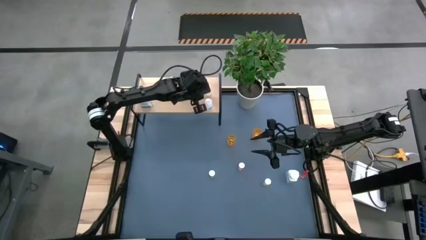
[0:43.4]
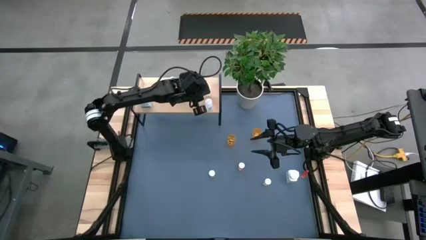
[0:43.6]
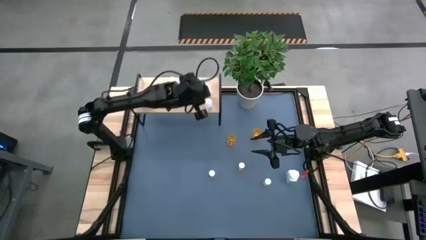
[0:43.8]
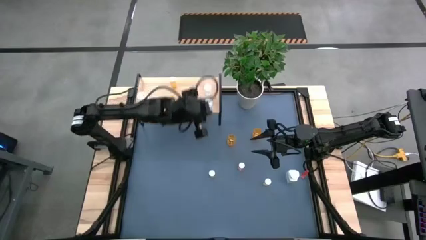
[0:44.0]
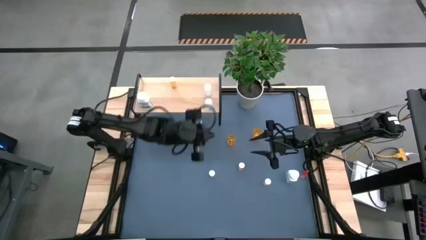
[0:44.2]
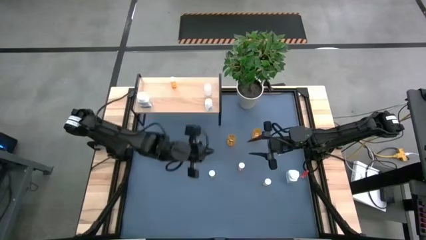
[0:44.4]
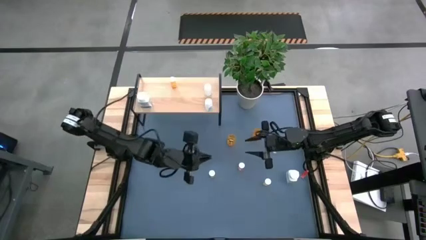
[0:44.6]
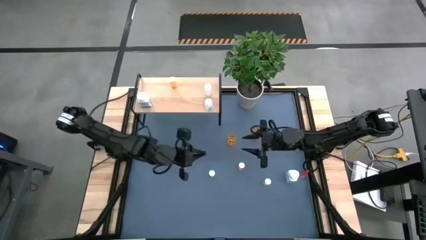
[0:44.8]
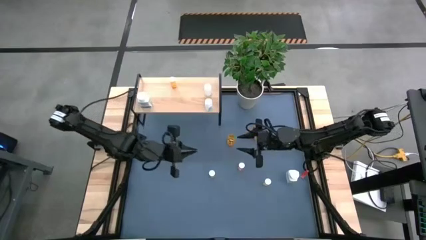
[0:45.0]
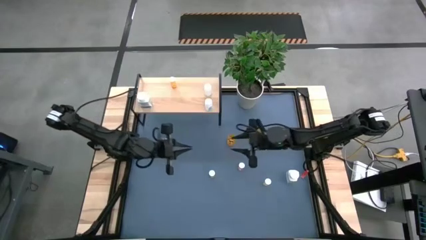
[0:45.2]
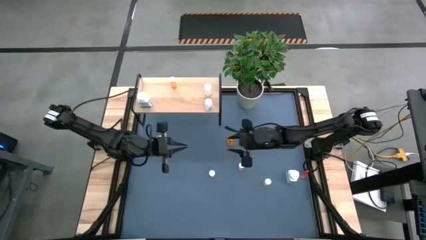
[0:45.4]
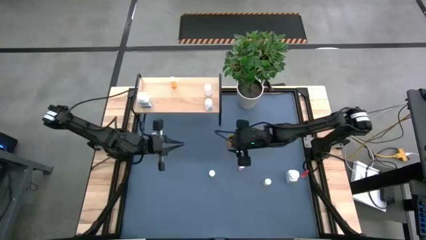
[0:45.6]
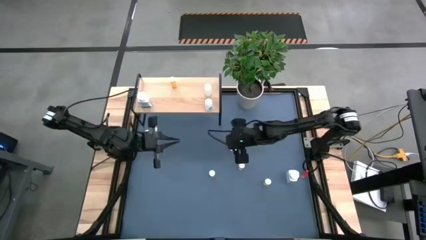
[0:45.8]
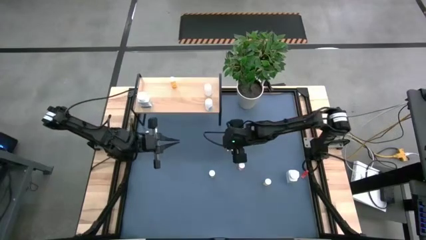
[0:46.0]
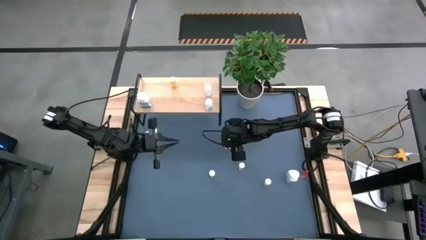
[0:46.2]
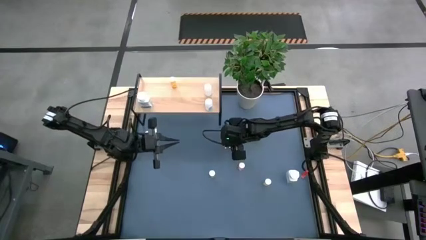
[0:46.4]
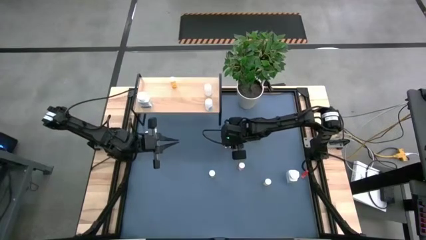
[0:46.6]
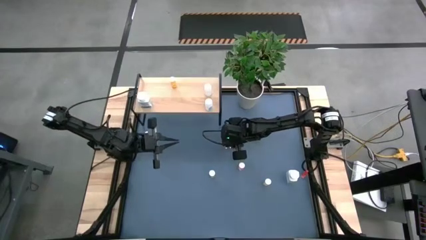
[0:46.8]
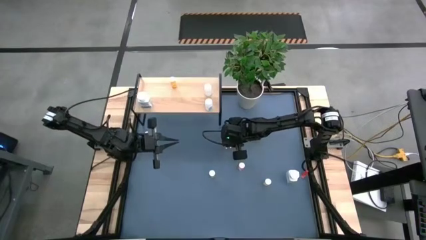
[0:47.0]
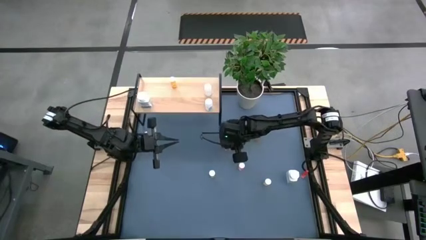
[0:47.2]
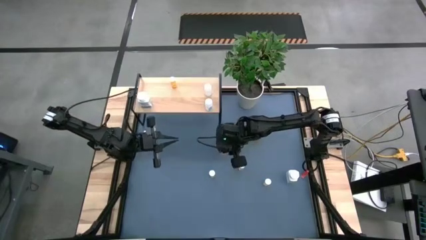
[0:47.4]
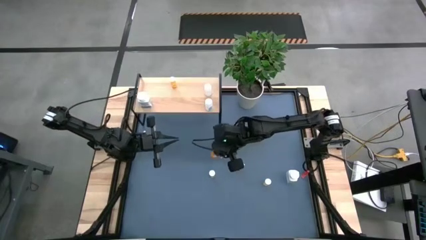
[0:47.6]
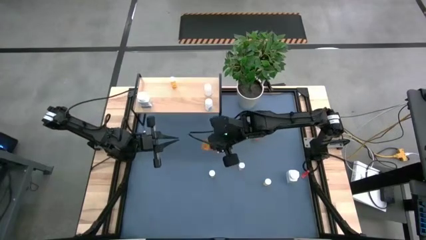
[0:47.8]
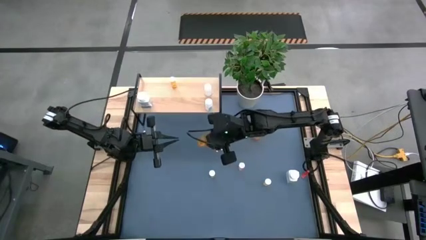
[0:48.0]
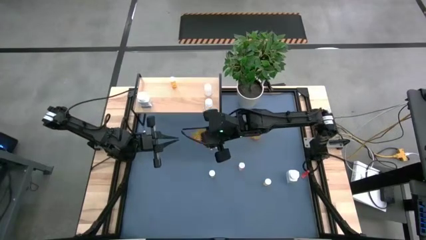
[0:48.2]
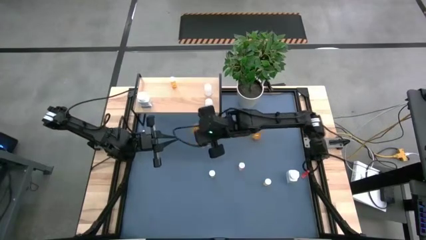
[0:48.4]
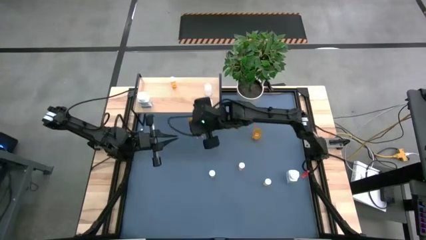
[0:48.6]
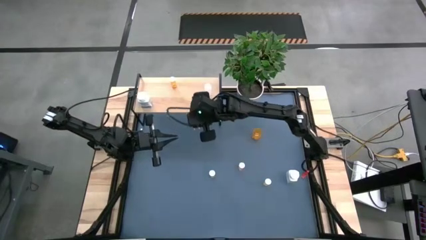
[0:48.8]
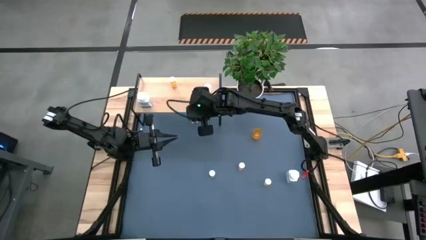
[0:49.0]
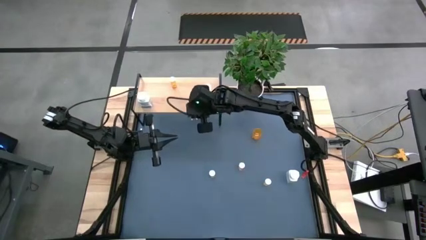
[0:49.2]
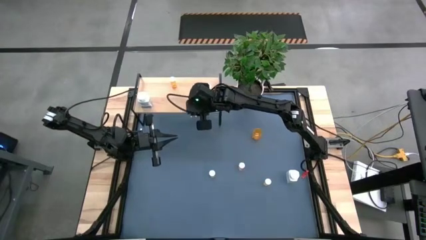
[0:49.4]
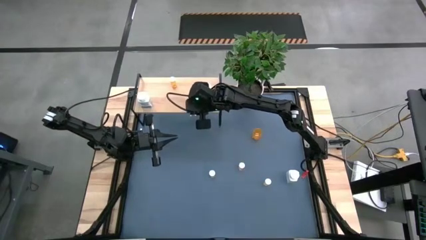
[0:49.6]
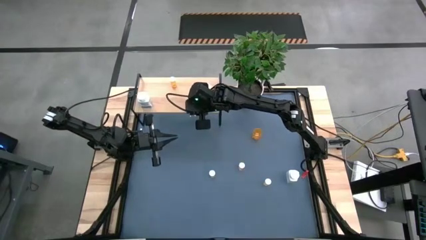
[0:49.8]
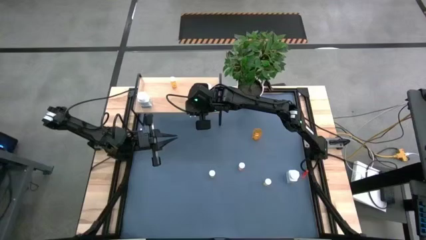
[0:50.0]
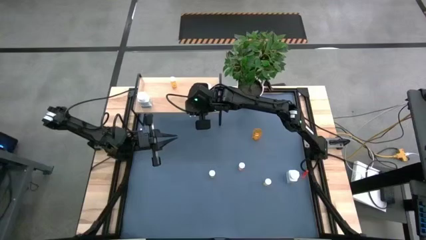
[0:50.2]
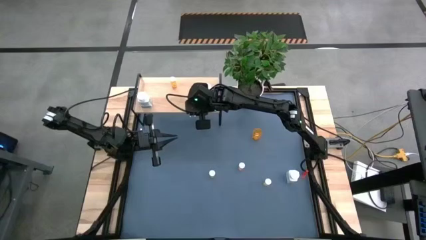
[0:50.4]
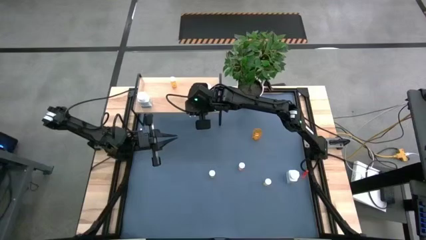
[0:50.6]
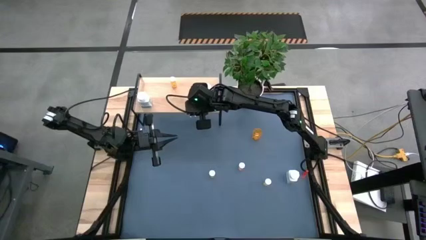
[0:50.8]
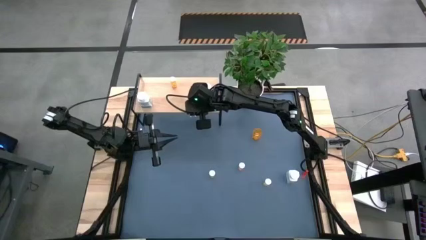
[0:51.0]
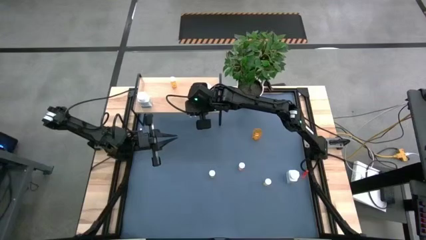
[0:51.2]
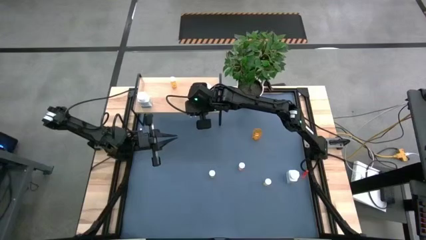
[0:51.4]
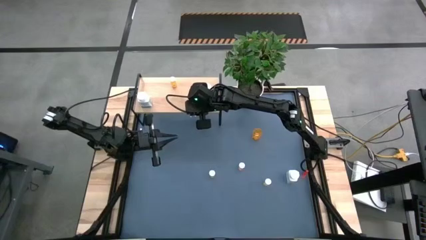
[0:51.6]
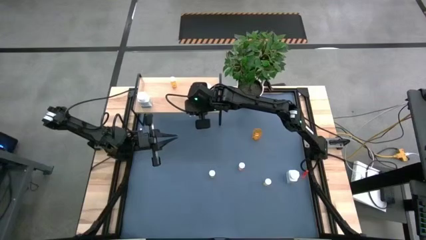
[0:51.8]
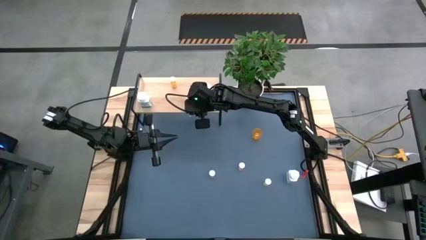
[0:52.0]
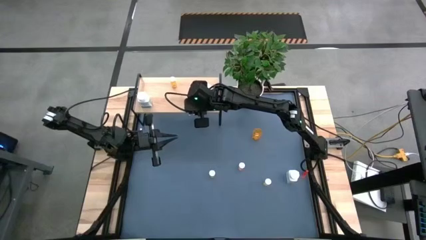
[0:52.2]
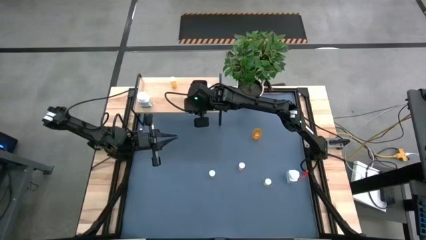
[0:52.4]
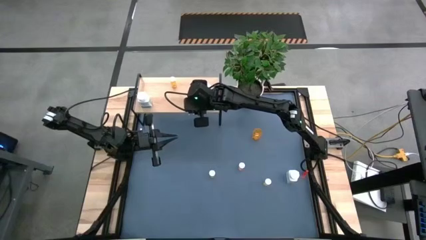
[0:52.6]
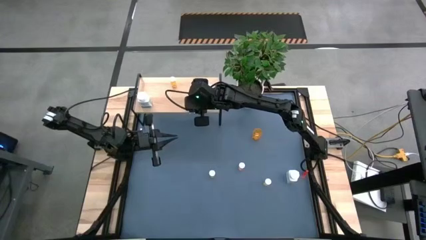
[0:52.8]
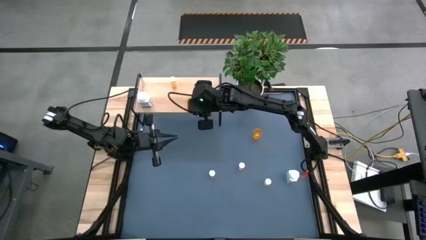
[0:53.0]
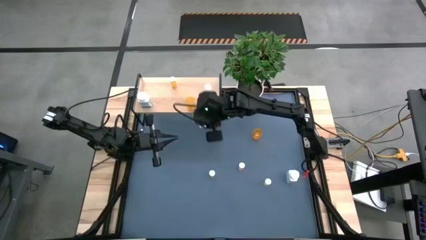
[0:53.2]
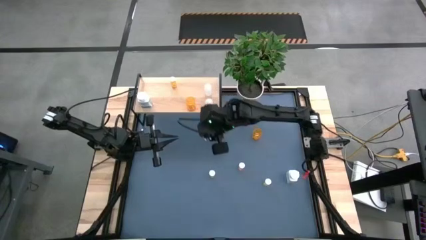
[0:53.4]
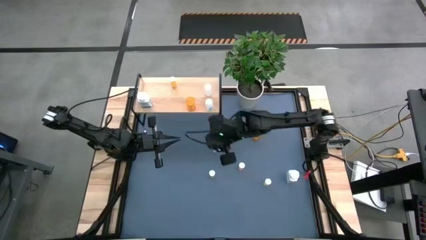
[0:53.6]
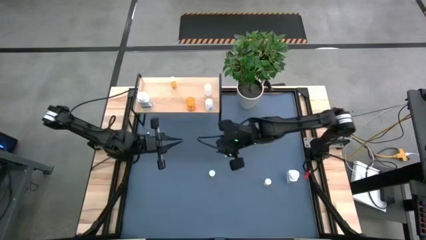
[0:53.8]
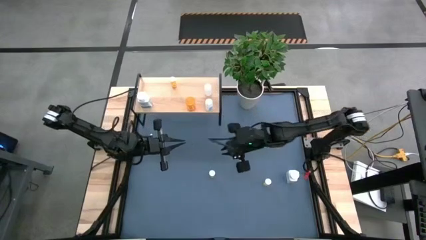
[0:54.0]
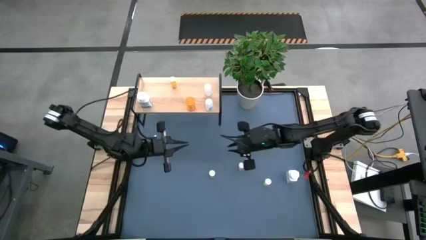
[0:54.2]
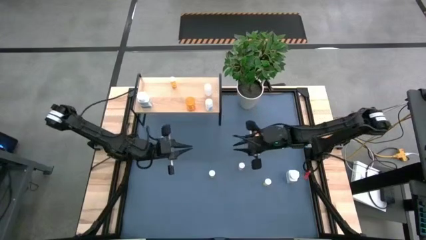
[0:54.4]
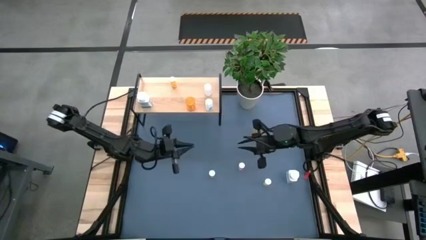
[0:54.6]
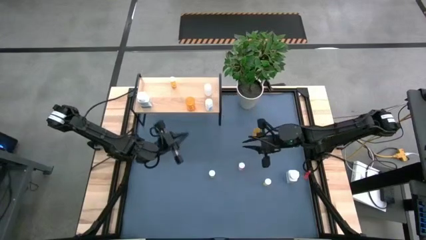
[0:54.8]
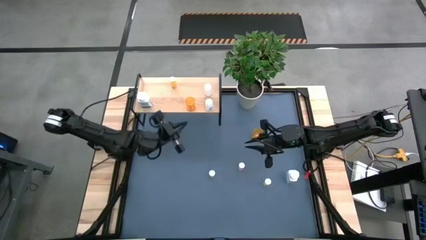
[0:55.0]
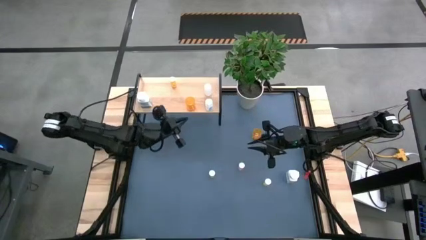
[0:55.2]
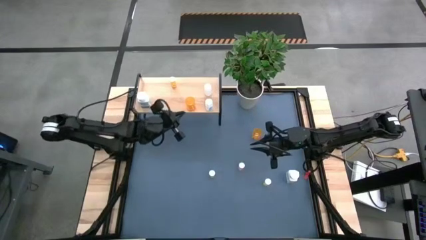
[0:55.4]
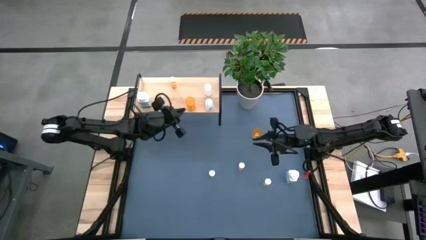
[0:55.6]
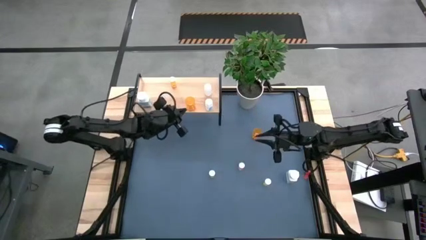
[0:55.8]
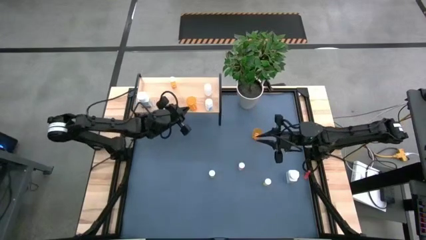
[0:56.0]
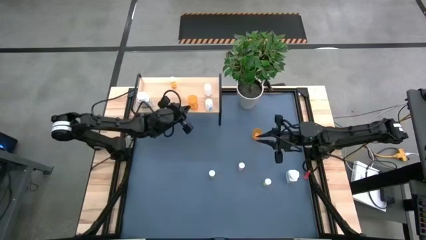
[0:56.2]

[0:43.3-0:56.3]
Task: Pick and place medicine bottles onto shelf by color
Put the left orange pill bottle on the shelf

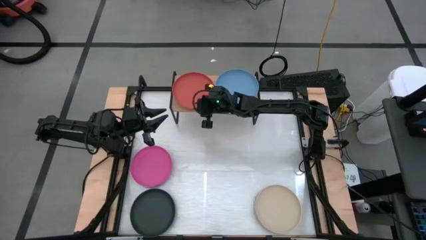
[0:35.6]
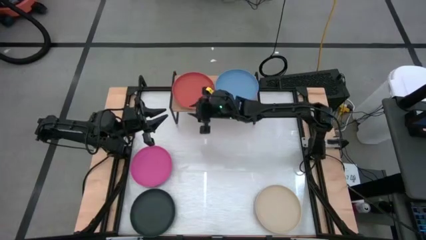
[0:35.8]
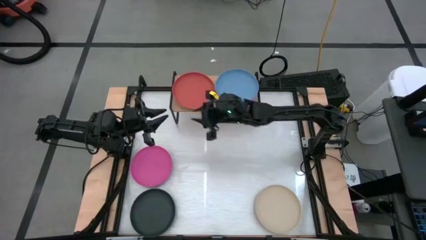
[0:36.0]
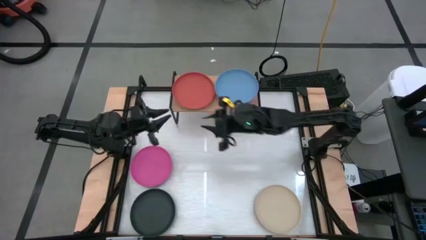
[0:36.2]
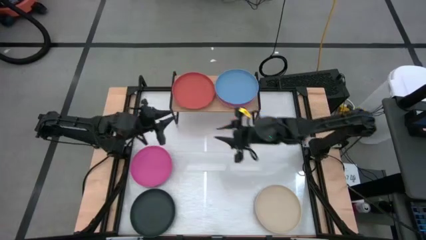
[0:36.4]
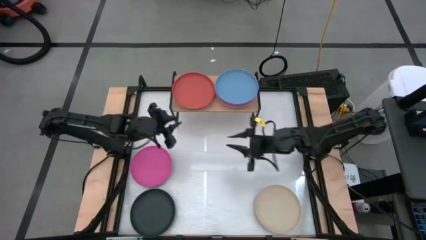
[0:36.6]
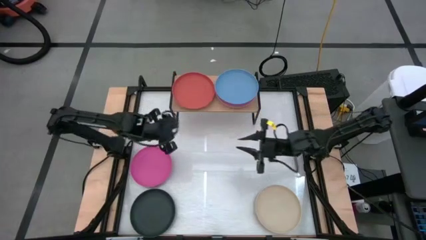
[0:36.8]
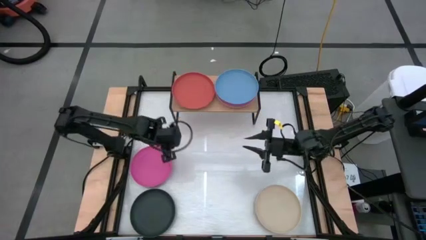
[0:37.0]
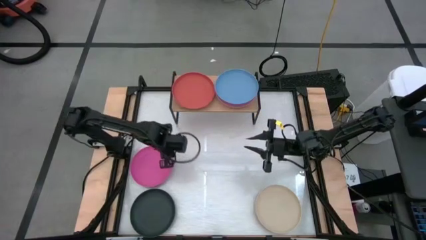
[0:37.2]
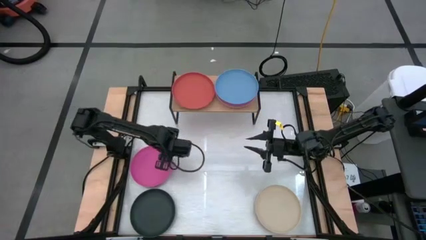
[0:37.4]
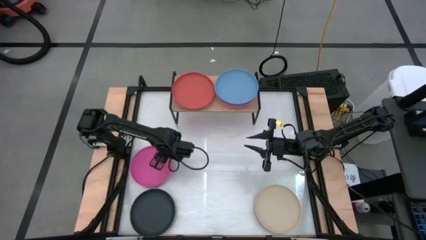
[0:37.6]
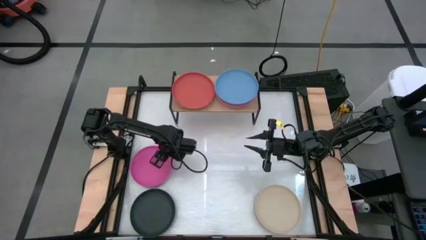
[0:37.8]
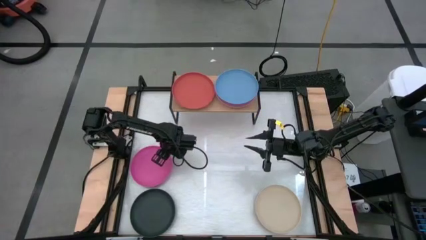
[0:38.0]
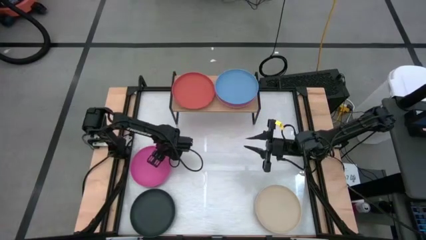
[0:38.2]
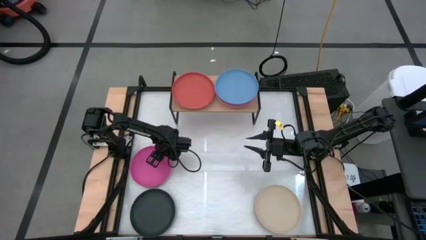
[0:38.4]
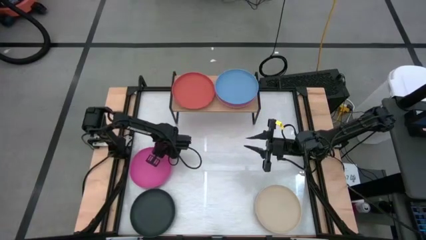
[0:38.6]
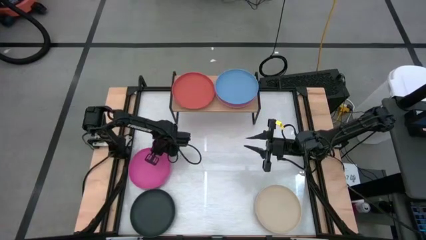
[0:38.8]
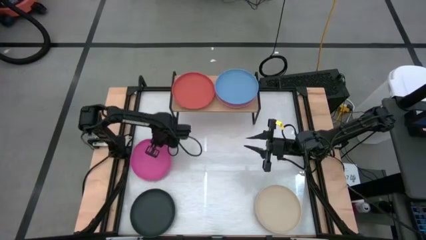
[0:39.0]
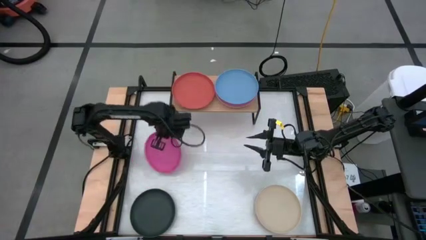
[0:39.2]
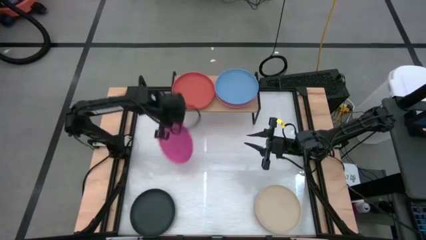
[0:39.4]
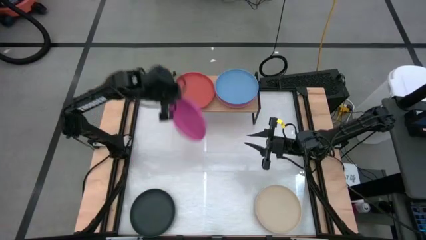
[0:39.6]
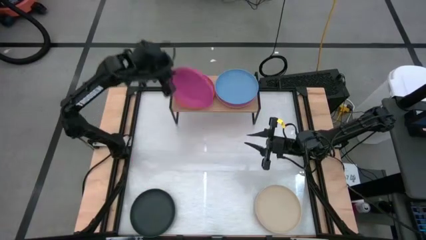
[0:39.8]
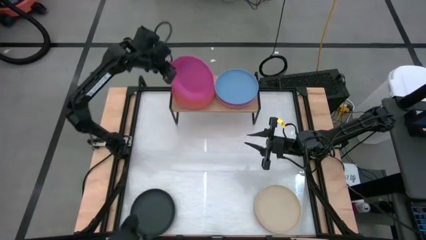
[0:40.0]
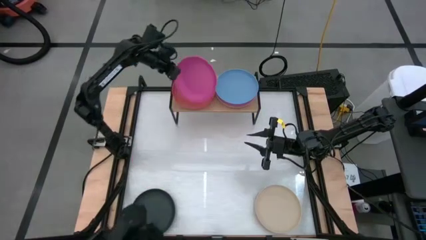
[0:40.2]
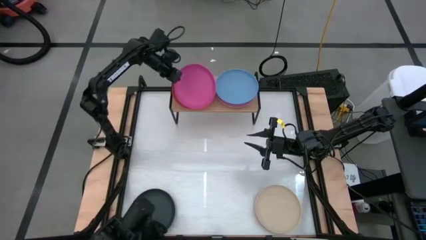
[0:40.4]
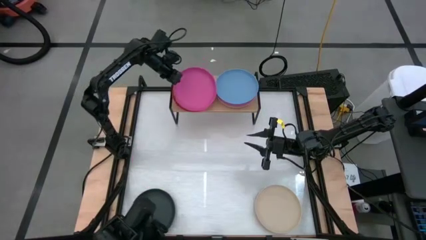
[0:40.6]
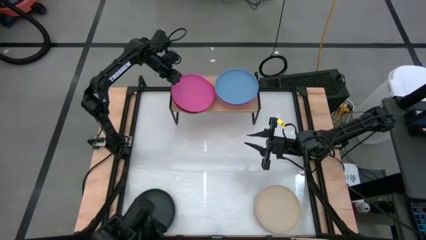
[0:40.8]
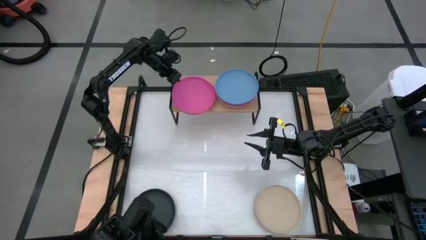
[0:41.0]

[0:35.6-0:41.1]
Task: Place and stack plates onto a shelf
Stack the pink plate on top of the orange plate
